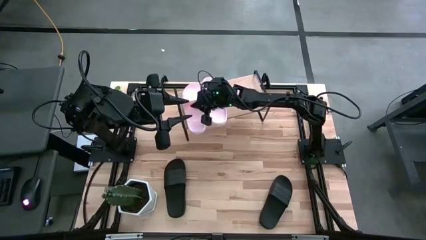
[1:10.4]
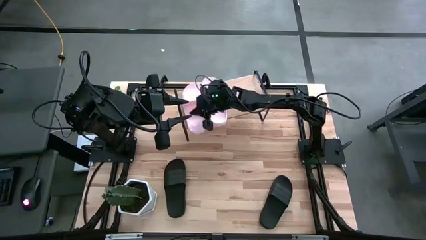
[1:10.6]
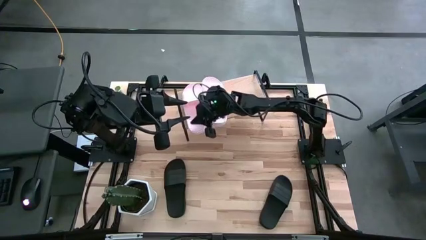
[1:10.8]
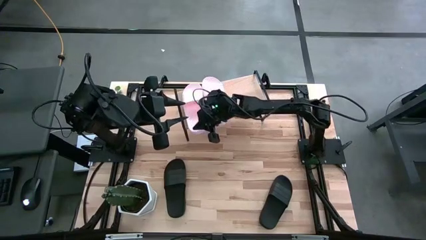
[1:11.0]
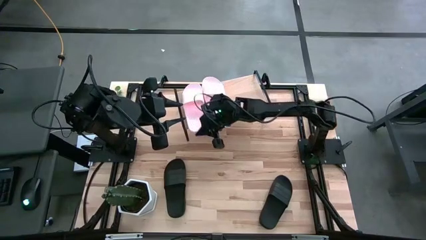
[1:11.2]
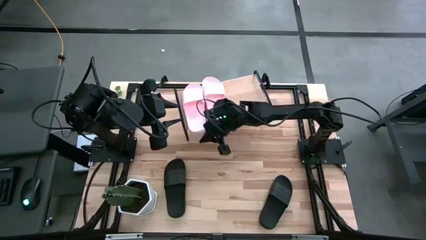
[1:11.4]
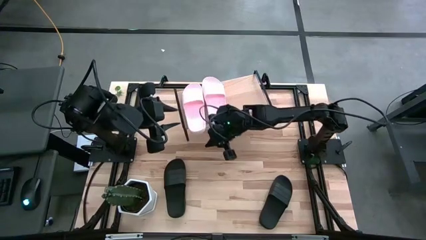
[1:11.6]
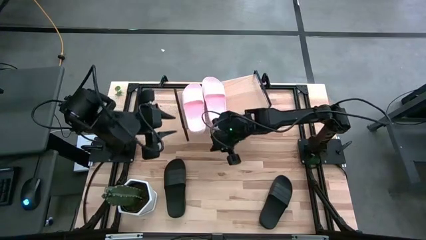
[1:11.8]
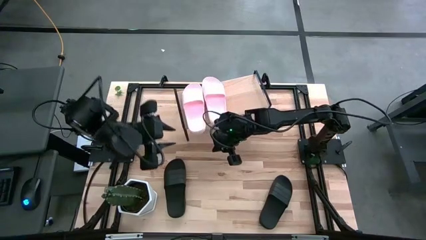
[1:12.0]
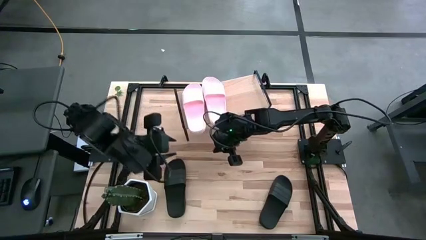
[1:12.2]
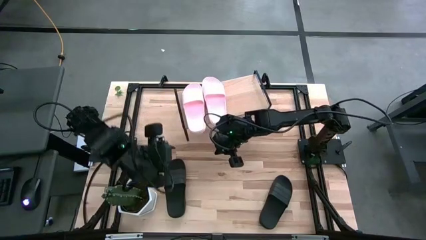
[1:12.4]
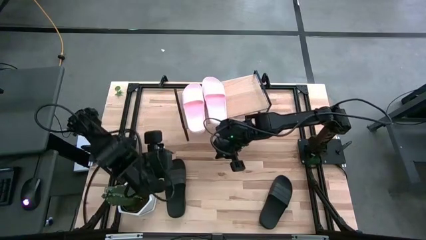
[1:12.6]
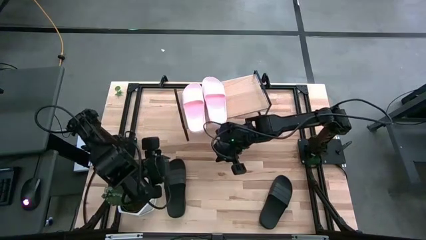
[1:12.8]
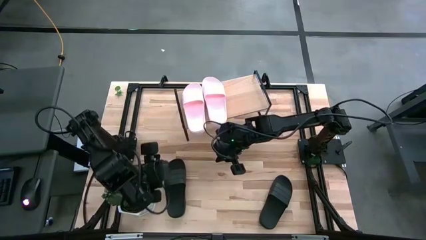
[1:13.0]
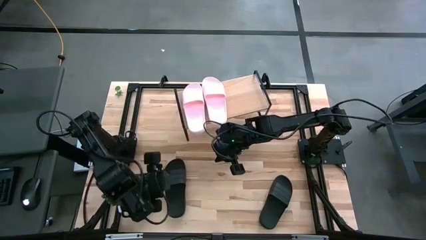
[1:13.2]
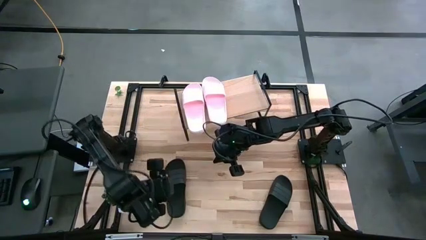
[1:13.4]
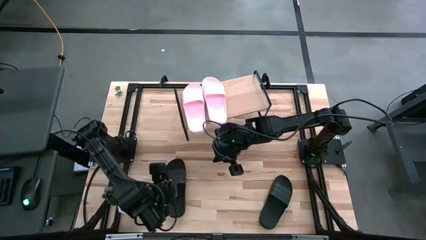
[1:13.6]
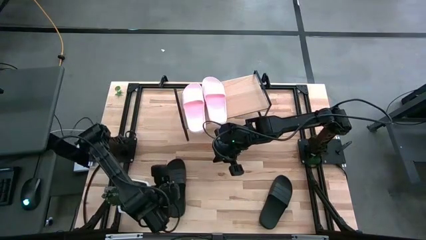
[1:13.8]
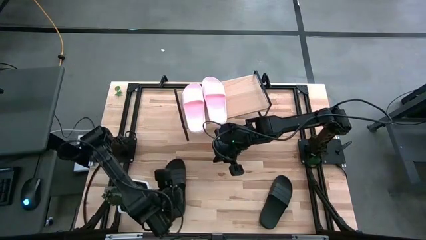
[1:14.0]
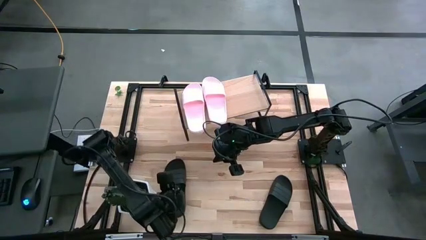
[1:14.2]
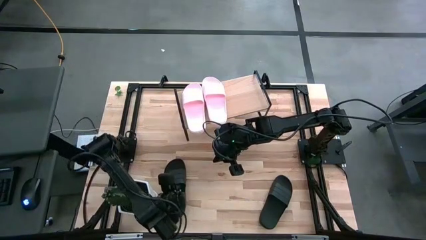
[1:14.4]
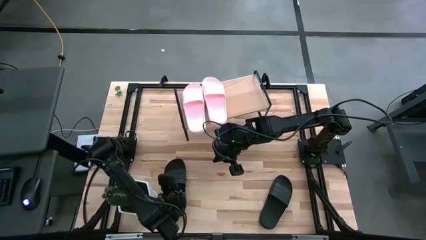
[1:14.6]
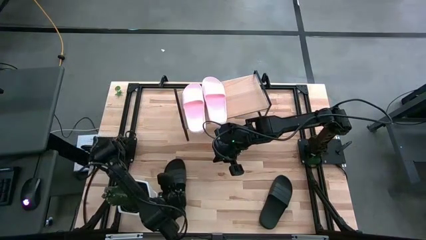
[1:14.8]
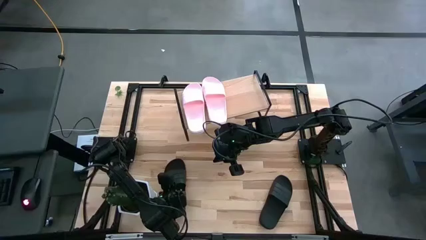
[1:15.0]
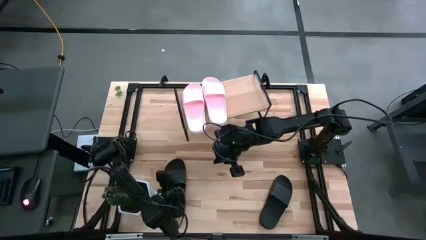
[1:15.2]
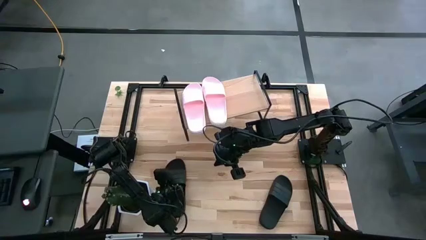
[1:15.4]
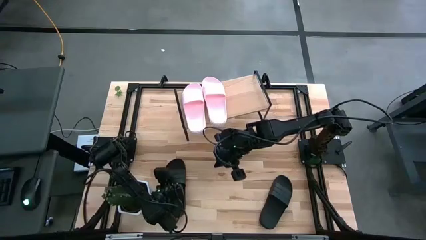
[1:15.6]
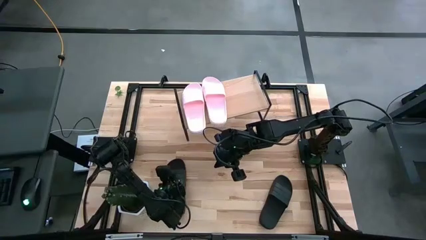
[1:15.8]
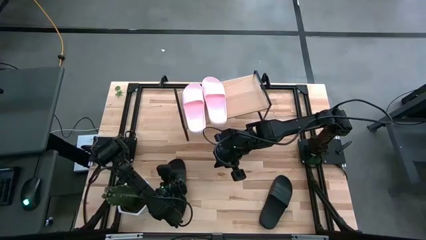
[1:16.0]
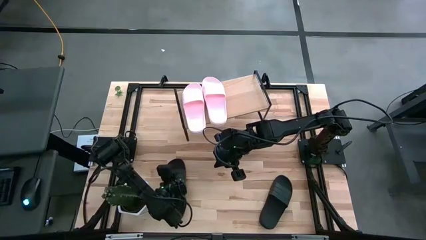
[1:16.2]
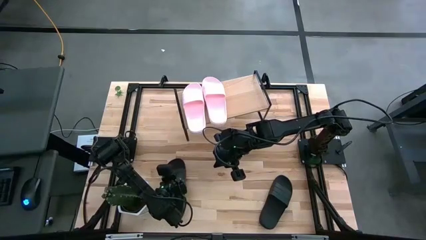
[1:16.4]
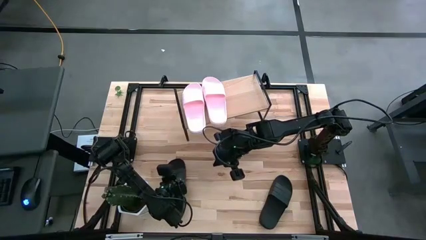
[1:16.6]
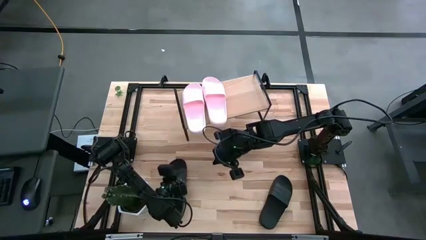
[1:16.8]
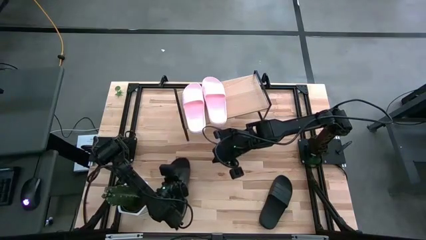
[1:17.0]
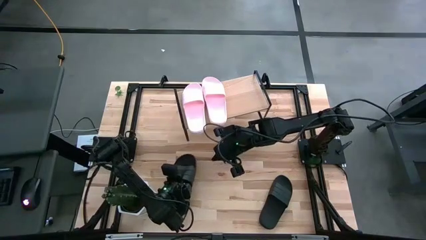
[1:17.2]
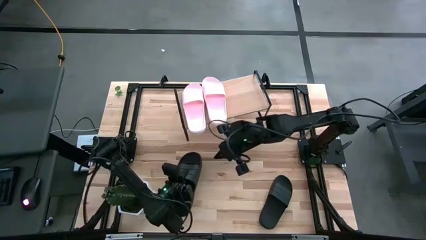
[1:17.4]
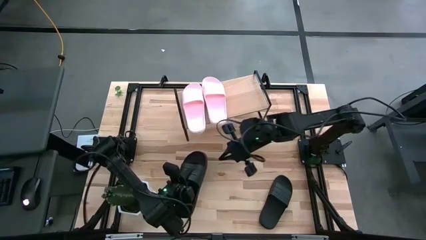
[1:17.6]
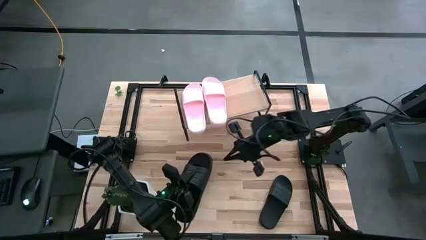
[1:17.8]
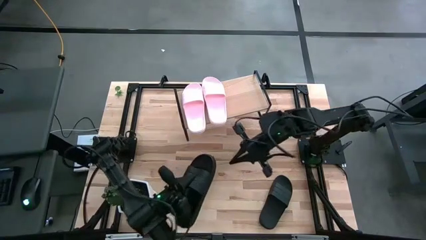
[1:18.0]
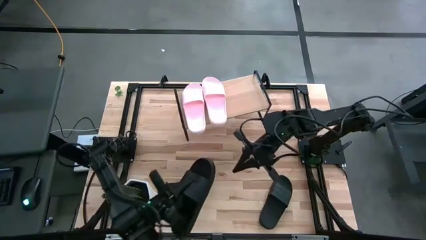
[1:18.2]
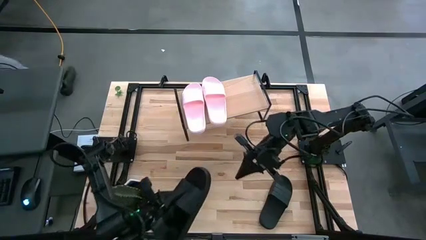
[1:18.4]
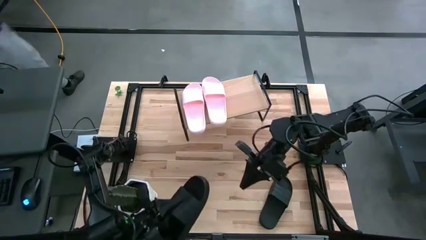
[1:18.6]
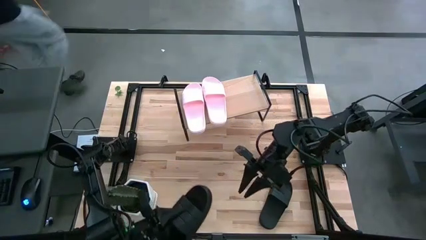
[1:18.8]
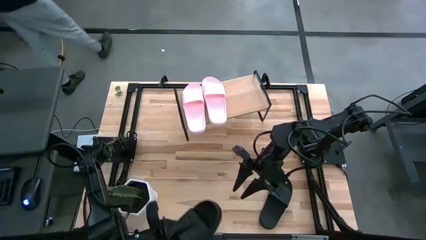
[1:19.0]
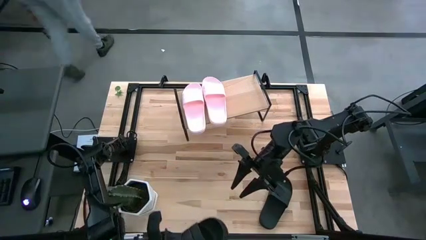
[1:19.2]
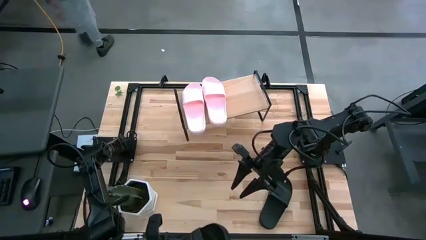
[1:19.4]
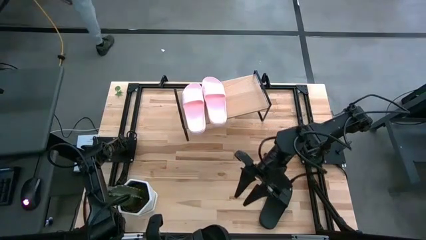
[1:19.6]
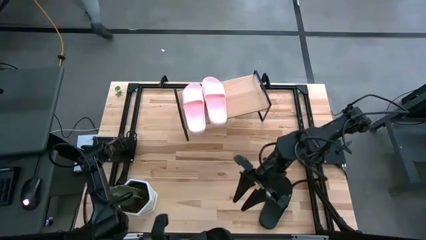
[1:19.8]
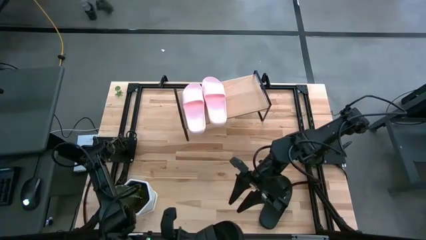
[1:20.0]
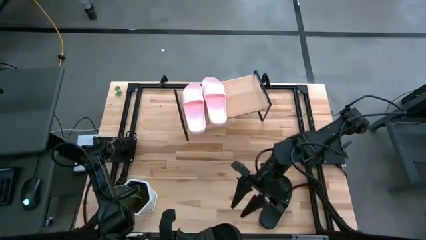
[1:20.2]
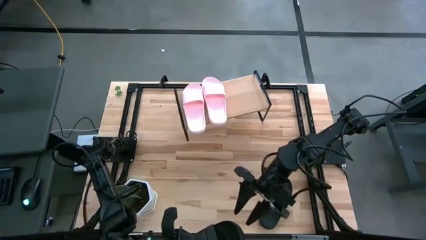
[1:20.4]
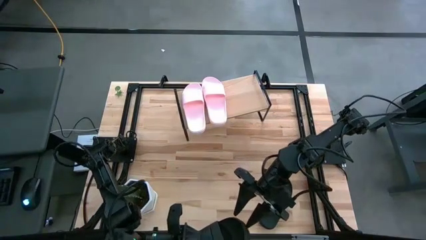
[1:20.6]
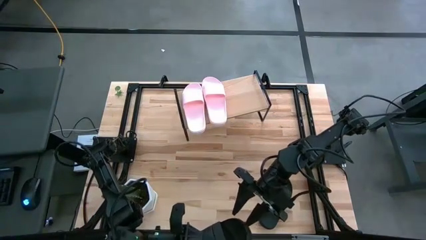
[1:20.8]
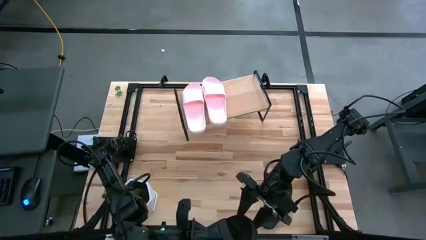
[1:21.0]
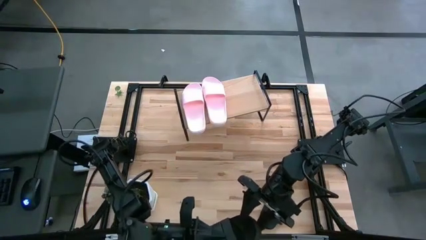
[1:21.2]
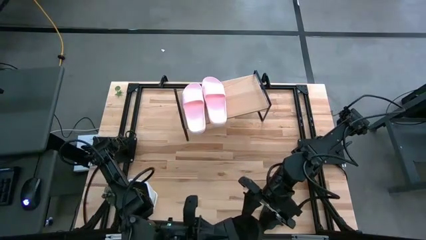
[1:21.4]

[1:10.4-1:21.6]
Task: Pick and place slides into the shelf
Put the left black slipper on the shelf

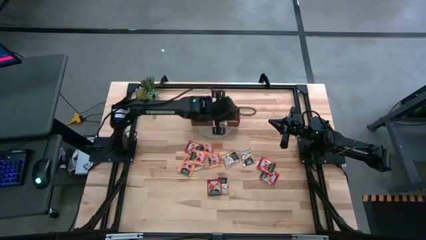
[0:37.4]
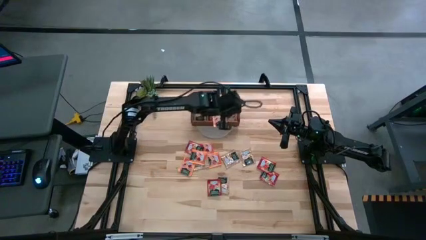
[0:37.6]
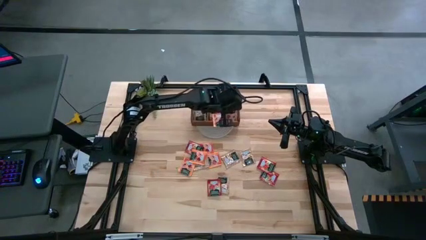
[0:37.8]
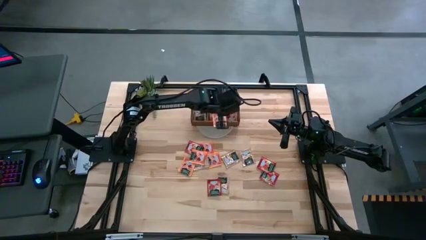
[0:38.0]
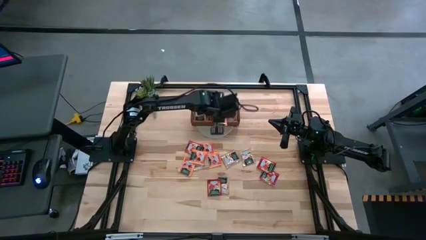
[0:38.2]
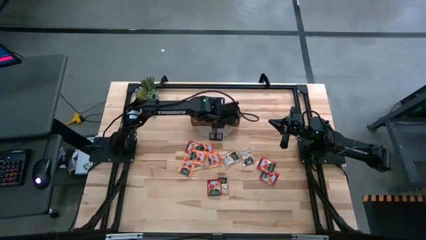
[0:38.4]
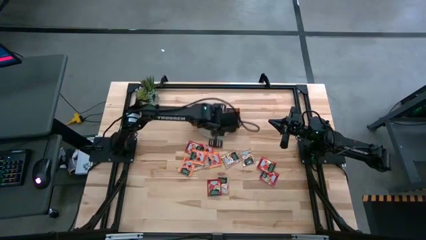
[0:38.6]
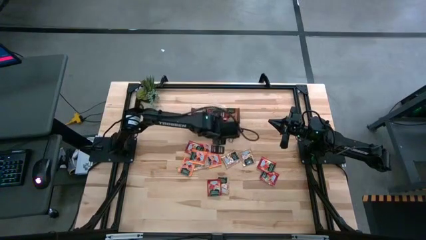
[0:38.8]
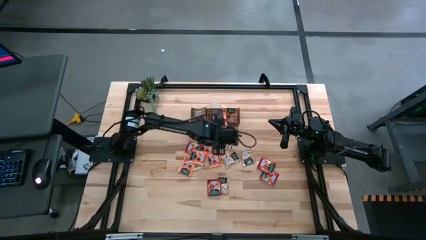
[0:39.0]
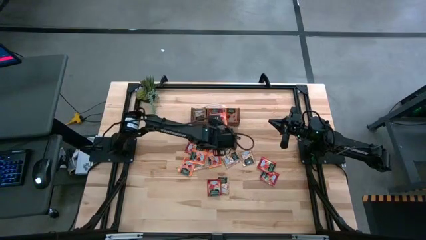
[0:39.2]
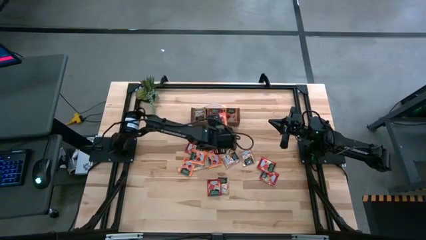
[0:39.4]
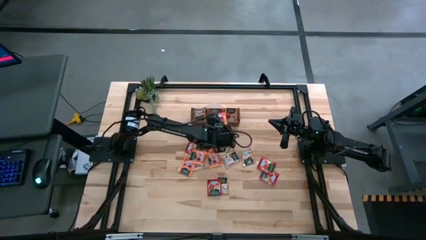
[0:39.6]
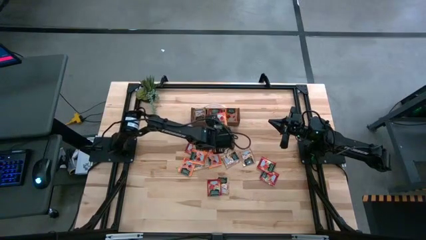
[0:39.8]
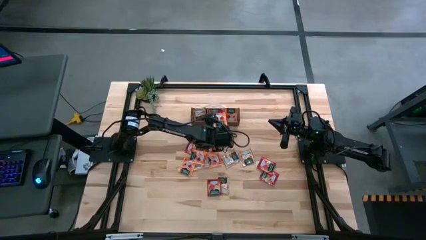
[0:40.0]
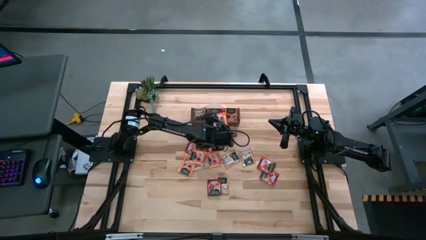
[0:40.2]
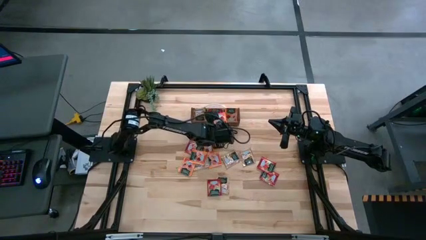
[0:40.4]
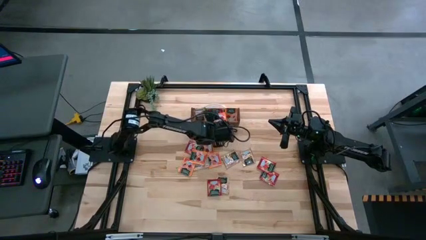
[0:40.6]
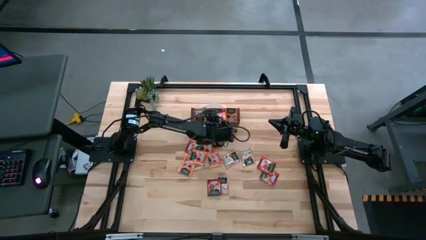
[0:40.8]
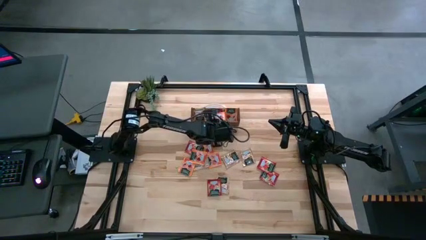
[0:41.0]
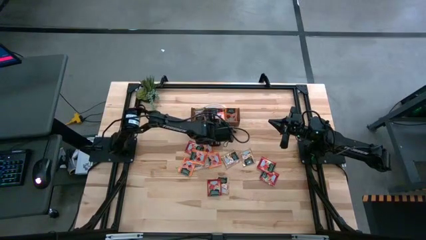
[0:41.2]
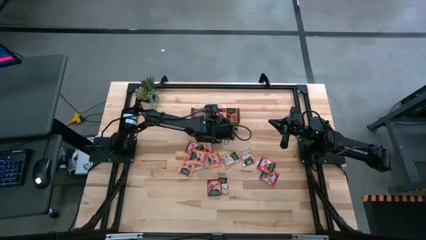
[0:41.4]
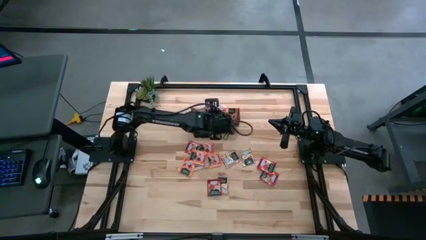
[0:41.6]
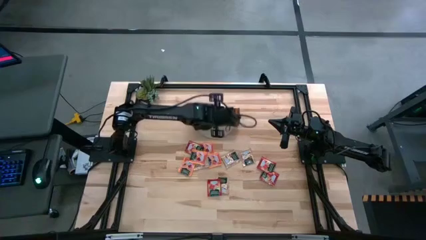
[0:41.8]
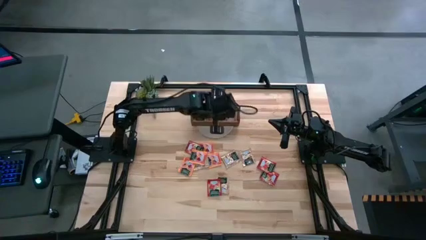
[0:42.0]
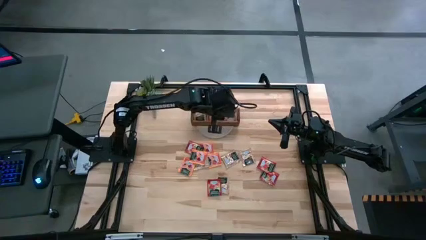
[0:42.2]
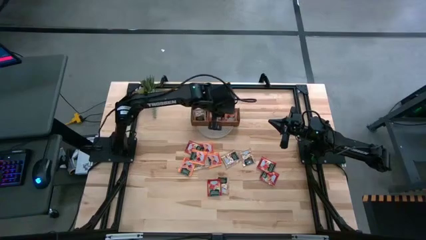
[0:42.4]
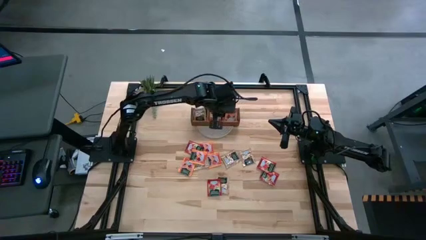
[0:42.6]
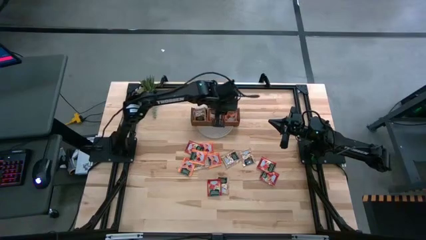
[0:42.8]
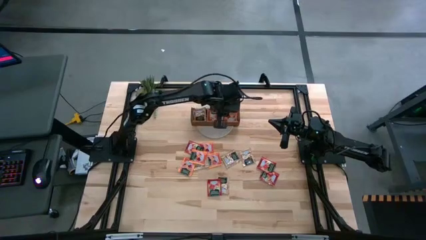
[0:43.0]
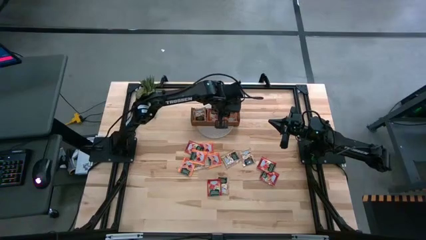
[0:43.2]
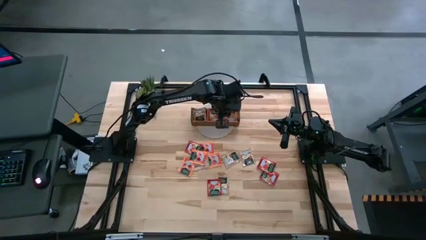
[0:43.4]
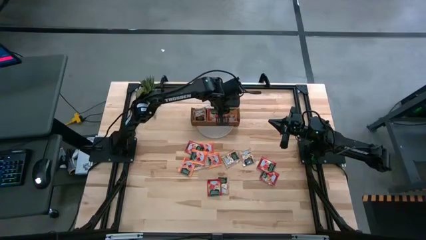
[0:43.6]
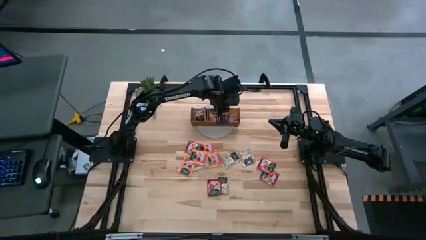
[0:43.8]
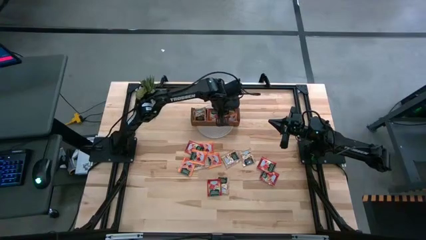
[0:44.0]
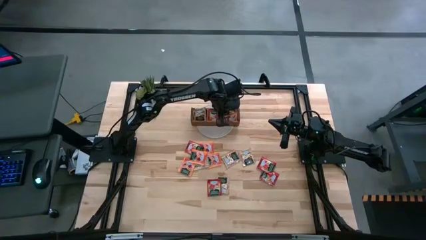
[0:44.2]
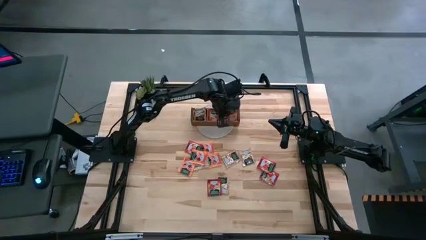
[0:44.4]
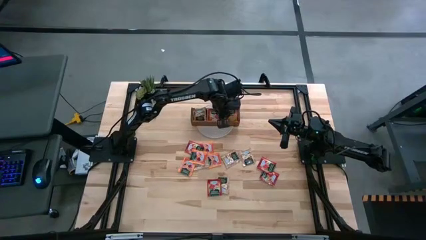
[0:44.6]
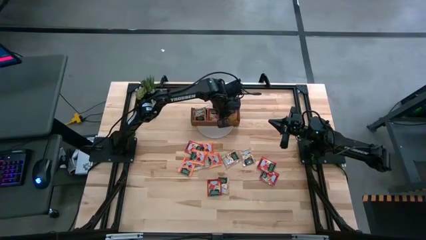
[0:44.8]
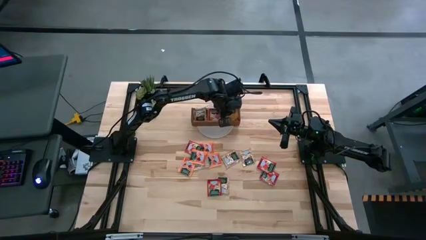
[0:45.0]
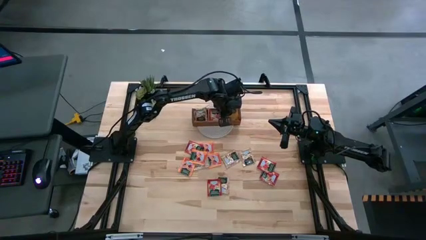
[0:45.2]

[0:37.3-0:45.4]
Task: Pick & Place Tea
Put the orange tea bag in the right section of the wooden organizer
